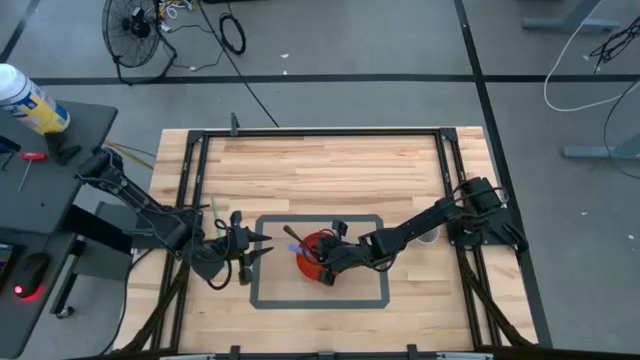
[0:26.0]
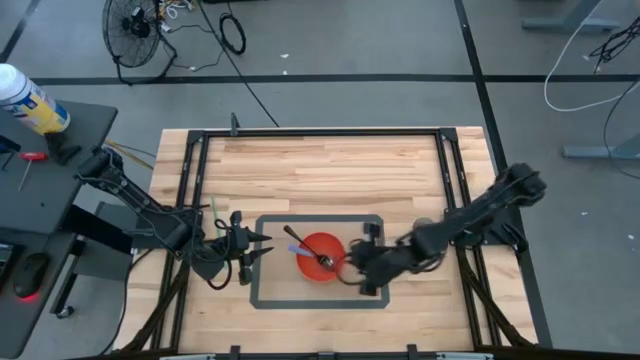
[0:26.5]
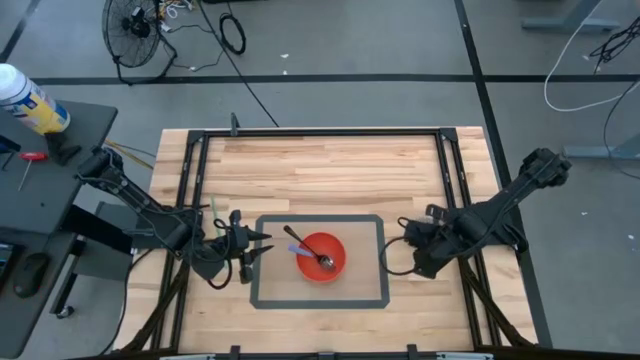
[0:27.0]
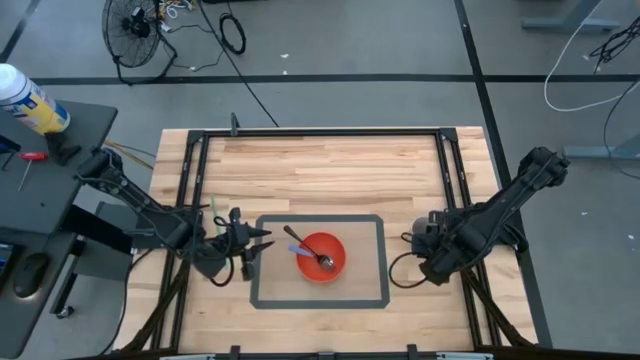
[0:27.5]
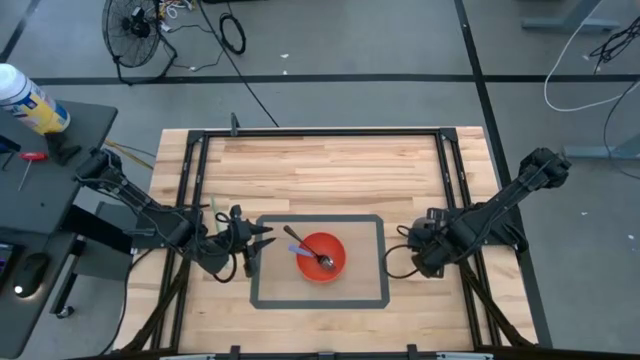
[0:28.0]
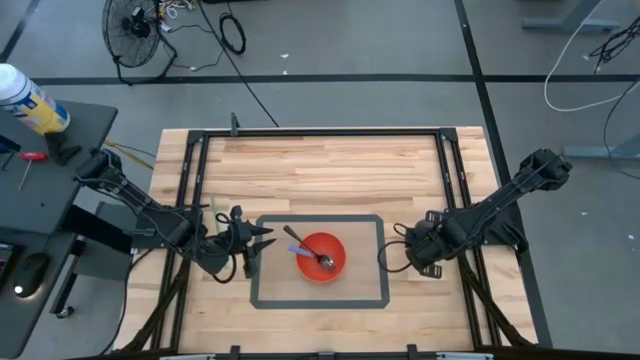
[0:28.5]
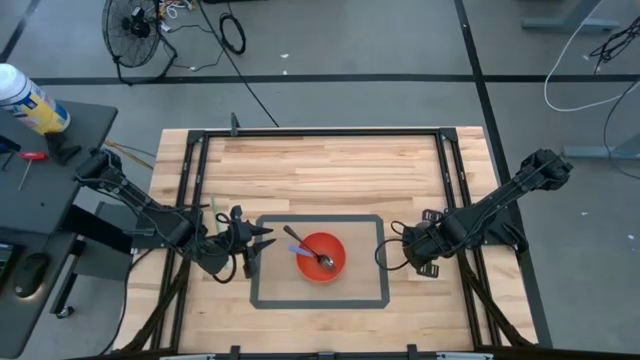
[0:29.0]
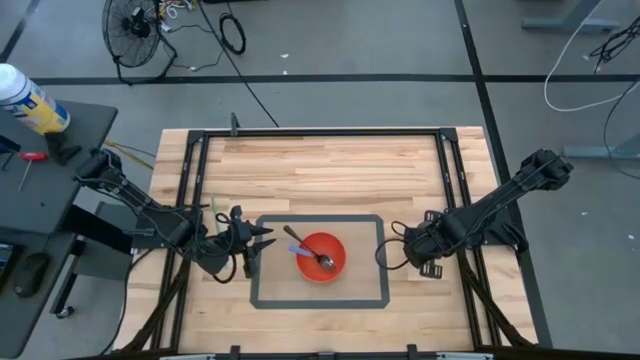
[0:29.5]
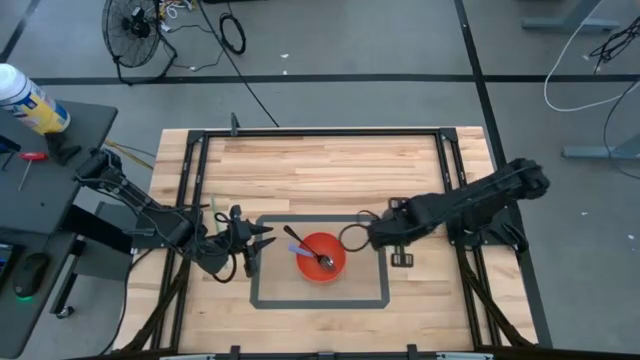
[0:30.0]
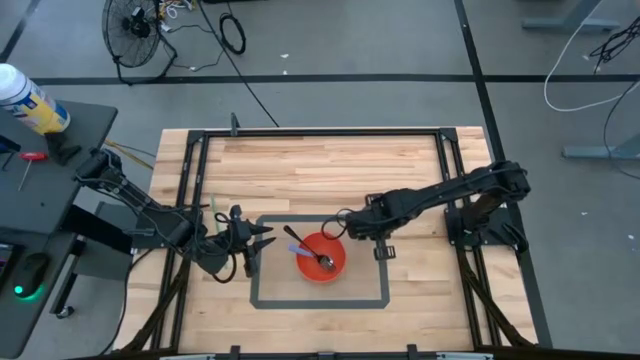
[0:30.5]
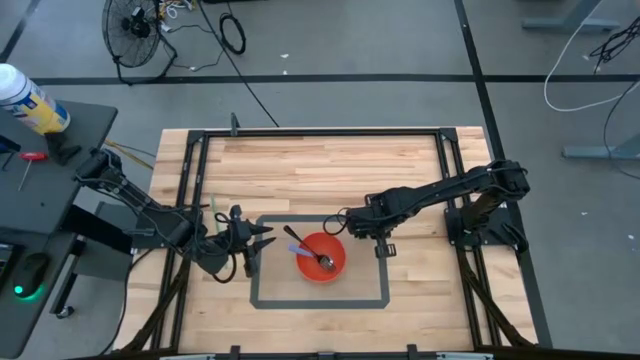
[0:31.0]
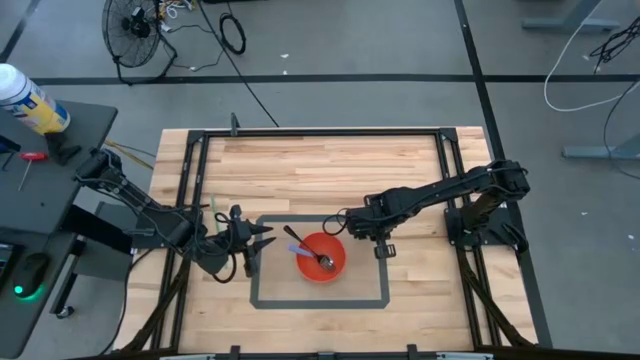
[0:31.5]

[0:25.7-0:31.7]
Task: Pick & Place Utensil
Put the gray cup on the top right of the placemat

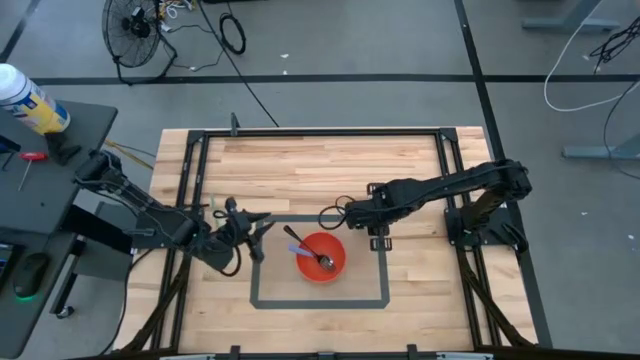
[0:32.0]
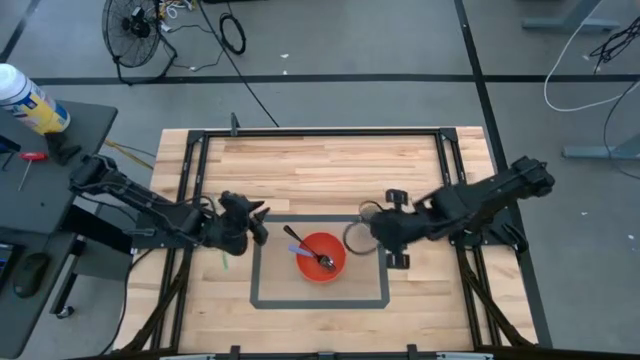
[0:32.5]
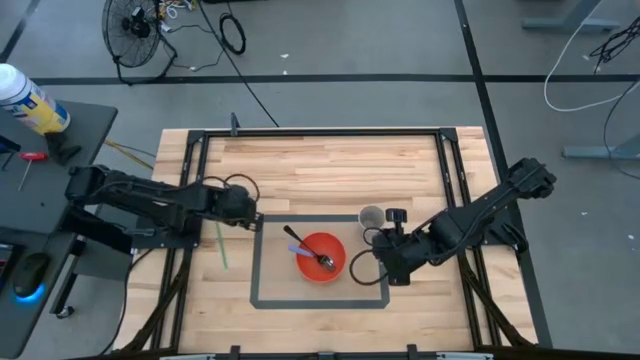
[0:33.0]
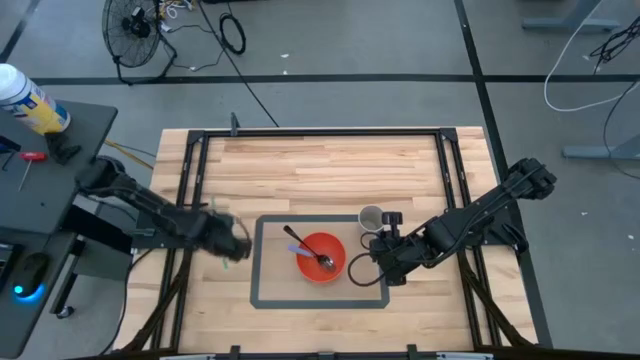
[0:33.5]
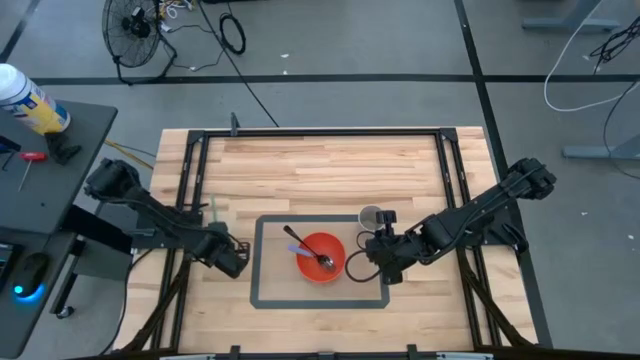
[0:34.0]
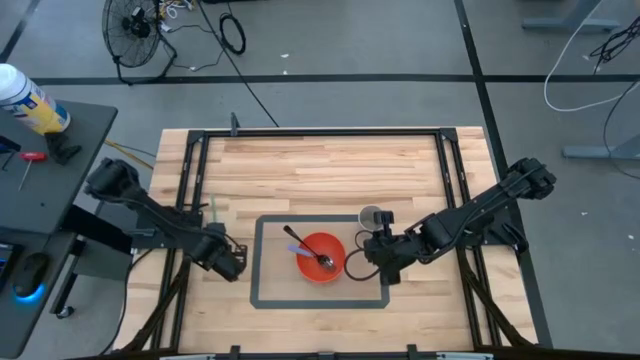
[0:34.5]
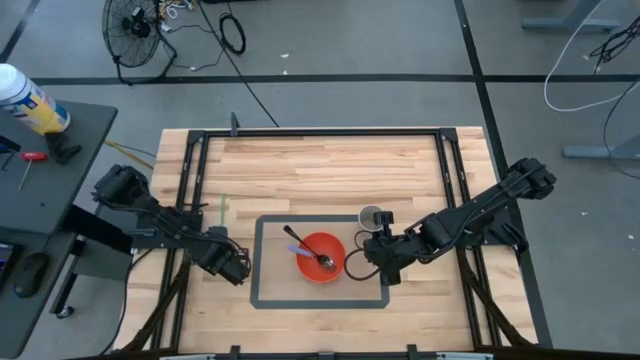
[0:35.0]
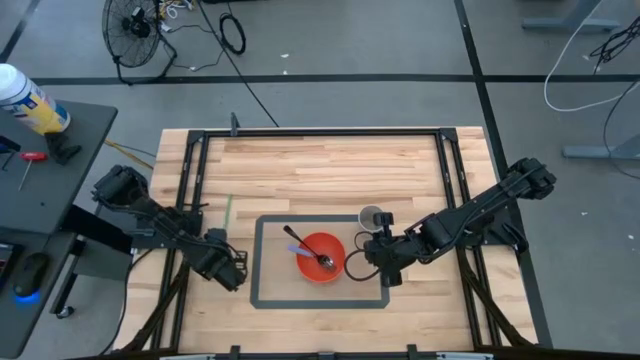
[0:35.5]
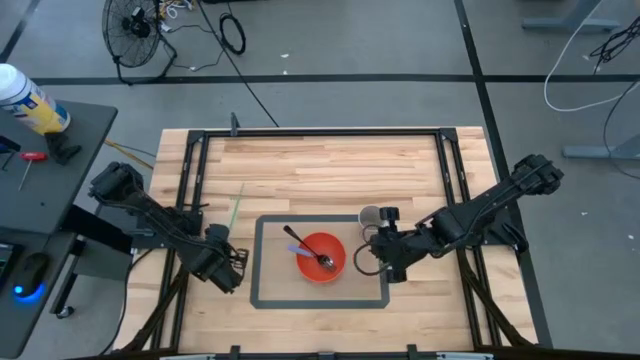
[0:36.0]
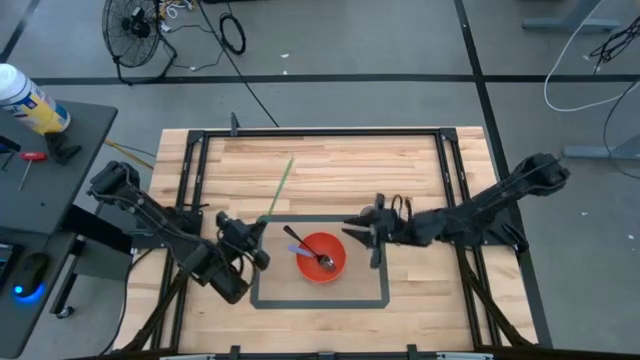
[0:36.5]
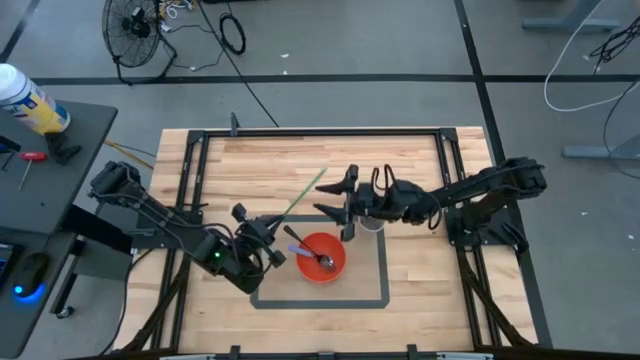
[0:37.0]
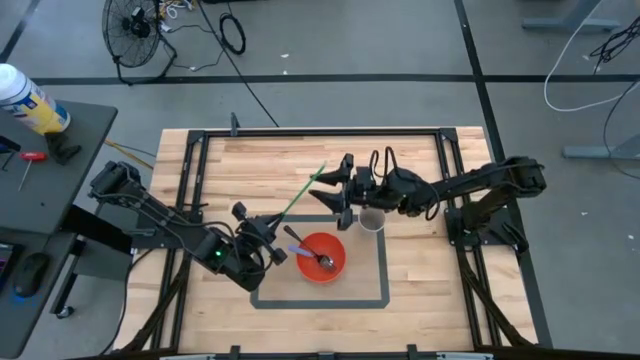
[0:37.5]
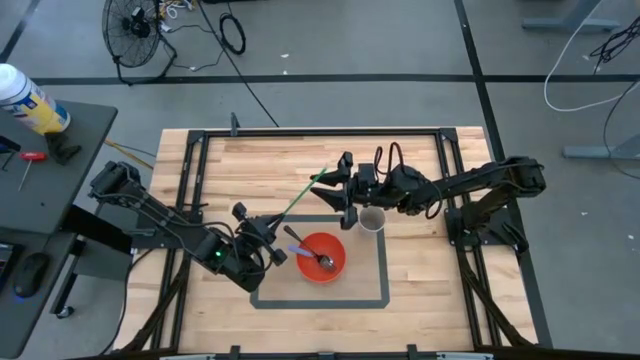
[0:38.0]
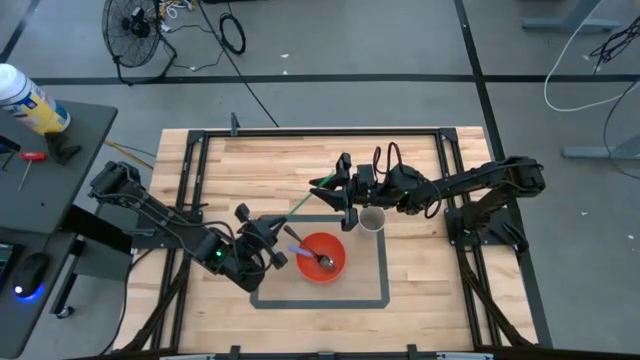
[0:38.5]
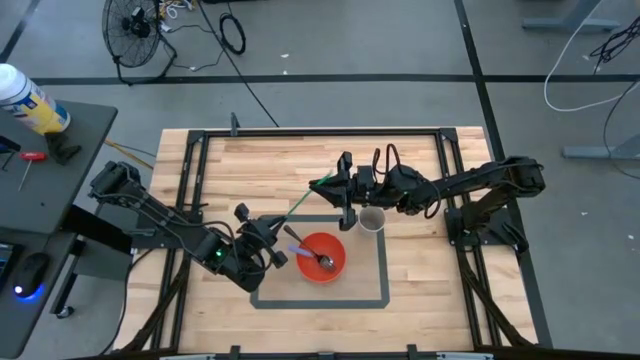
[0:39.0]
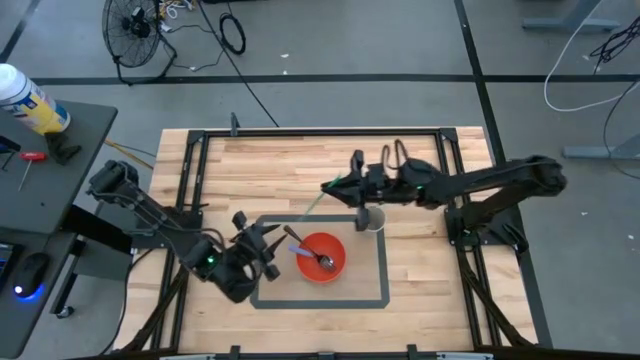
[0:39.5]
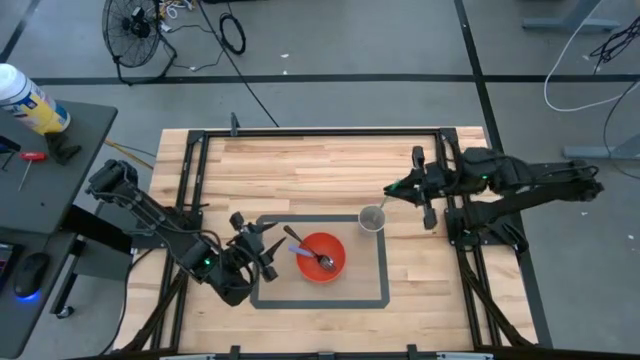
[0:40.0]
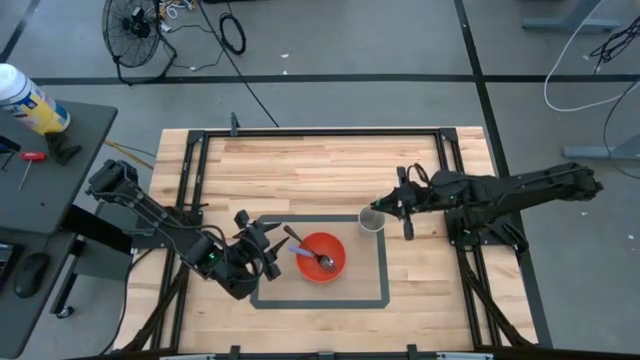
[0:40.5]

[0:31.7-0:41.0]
Put the green straw in the gray cup

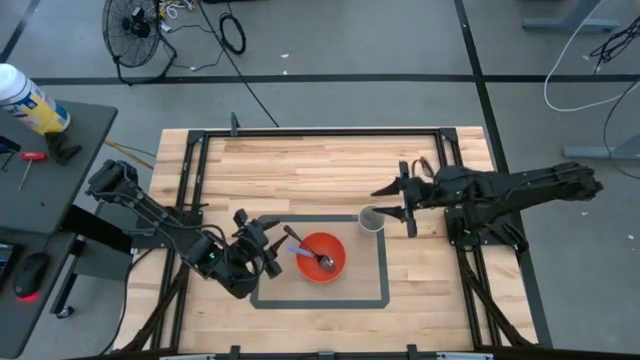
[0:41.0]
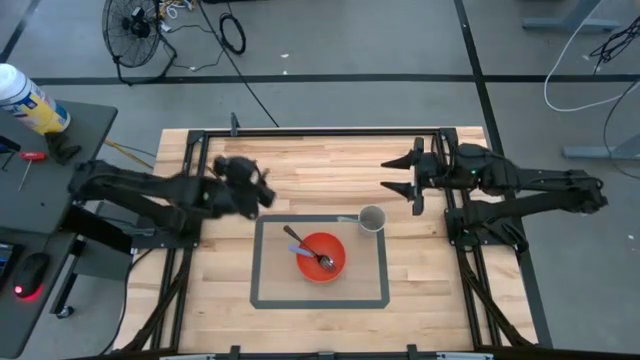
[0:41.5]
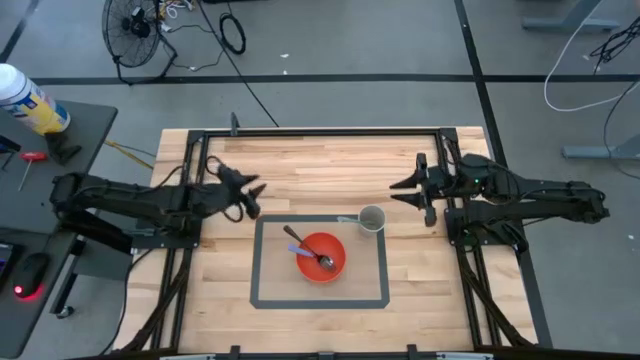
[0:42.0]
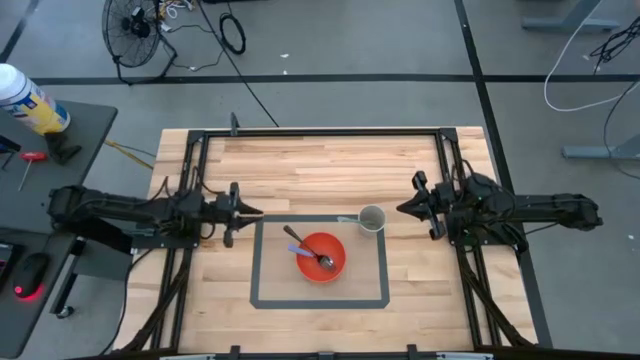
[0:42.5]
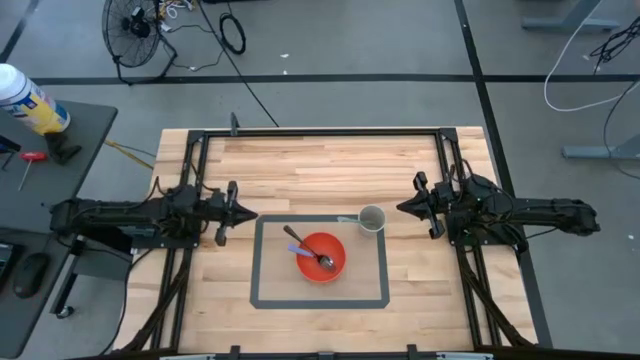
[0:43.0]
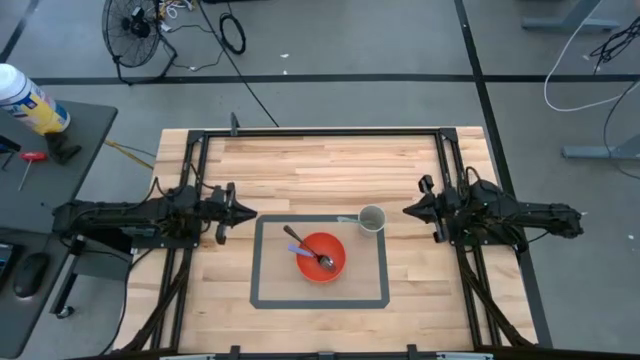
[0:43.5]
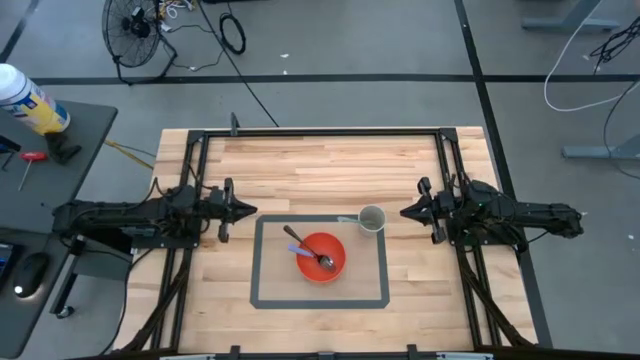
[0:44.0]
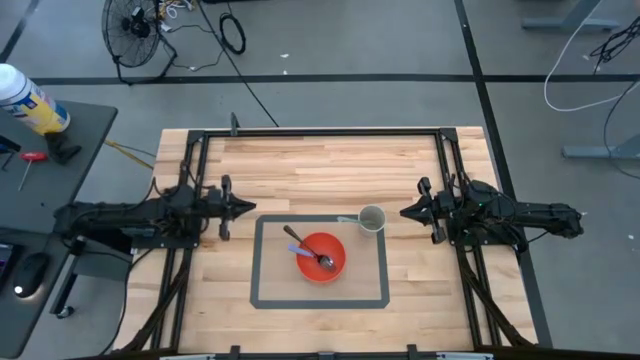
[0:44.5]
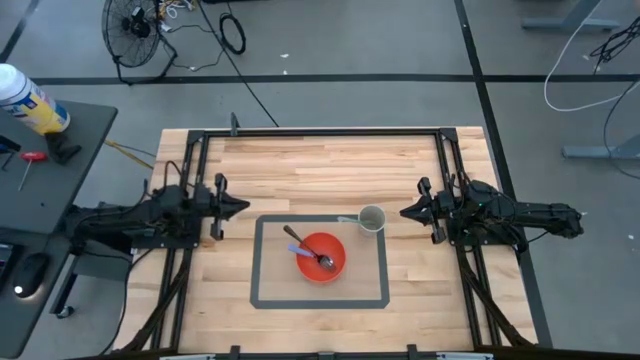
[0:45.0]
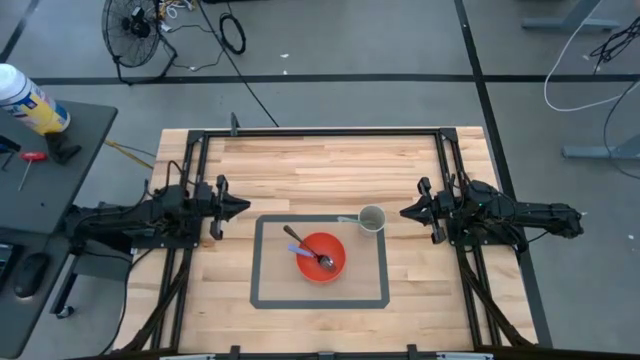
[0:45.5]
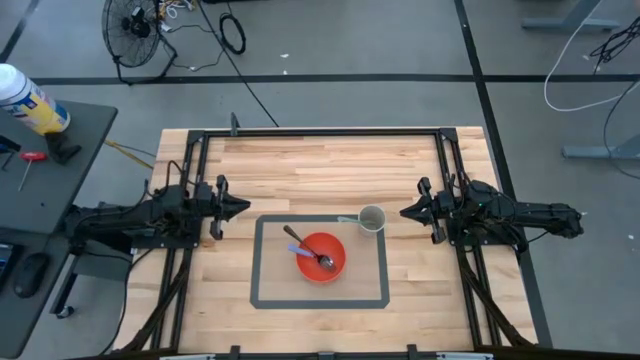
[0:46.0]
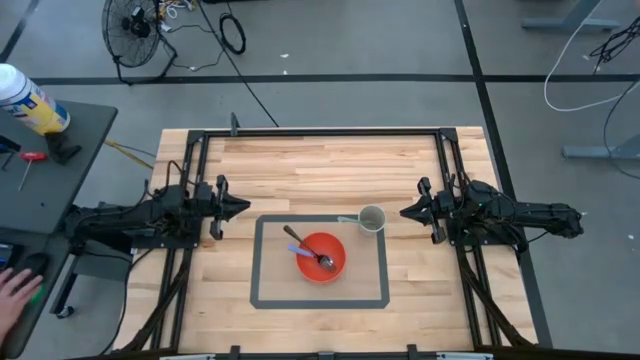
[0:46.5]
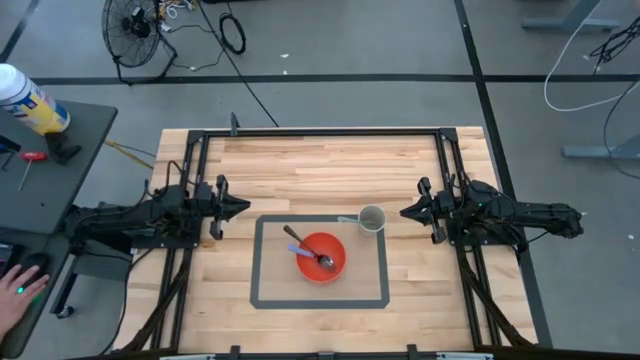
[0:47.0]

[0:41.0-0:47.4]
Return to Home Position

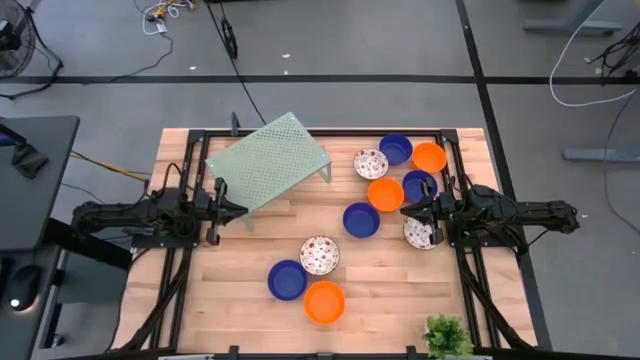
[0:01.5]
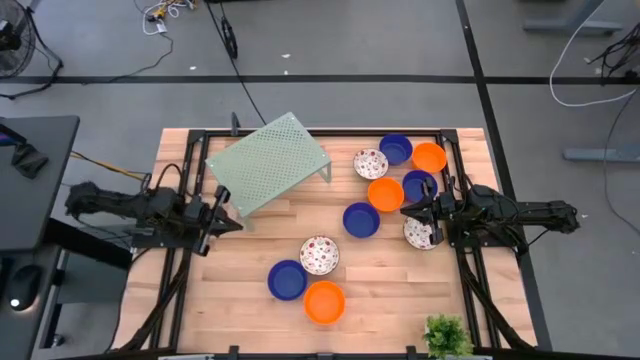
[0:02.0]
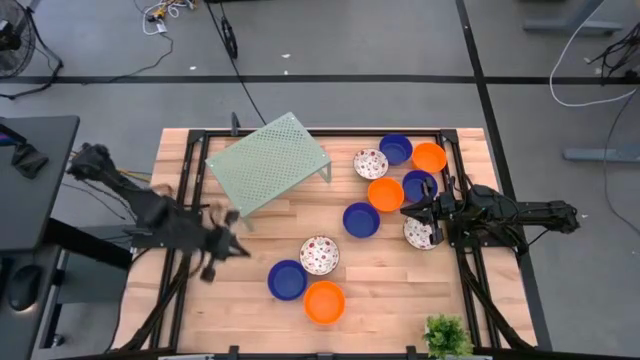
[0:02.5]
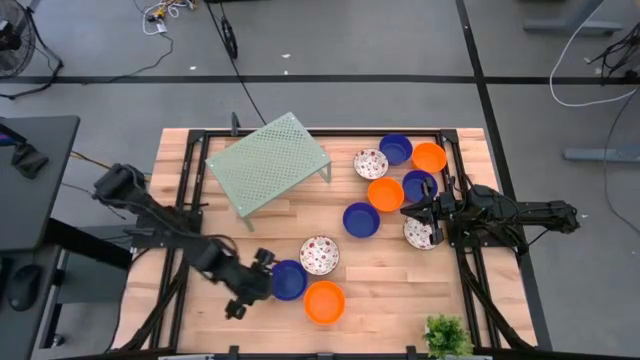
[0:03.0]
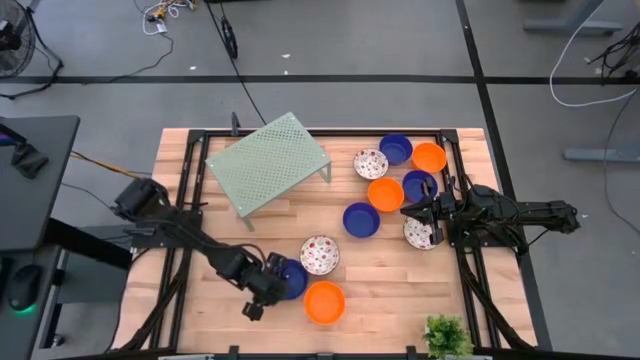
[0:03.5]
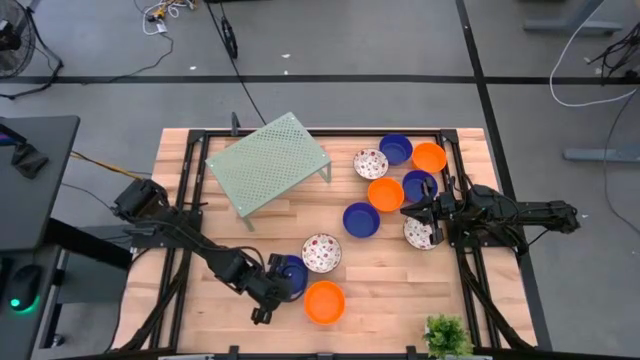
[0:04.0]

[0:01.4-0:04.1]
Task: Pick & Place Mini bowls
Put the blue bowl on the shelf
